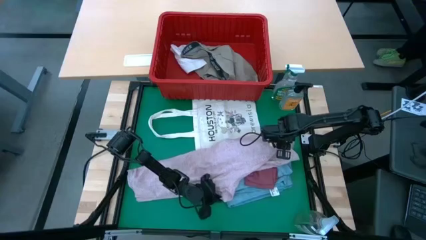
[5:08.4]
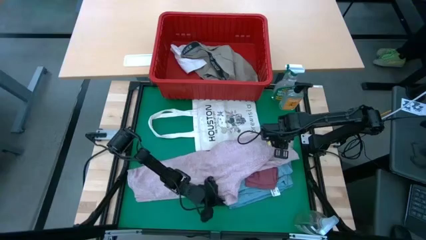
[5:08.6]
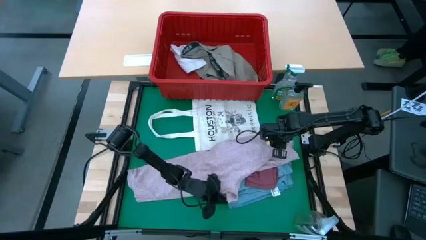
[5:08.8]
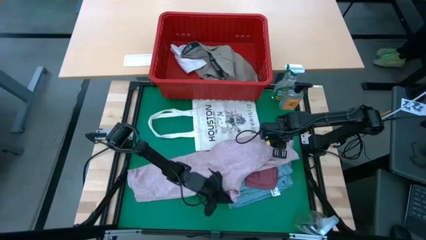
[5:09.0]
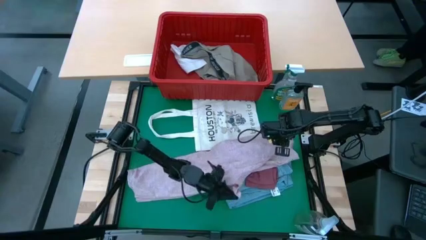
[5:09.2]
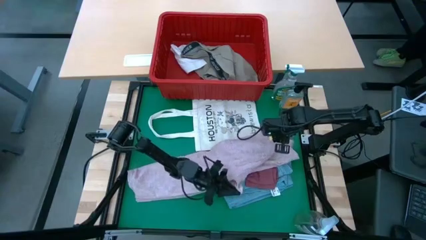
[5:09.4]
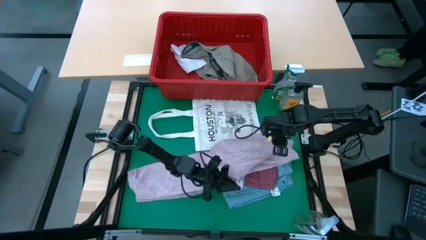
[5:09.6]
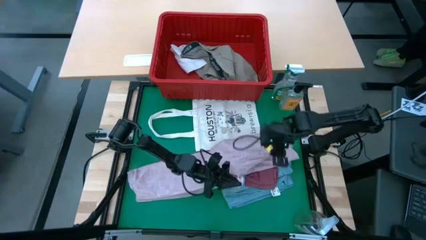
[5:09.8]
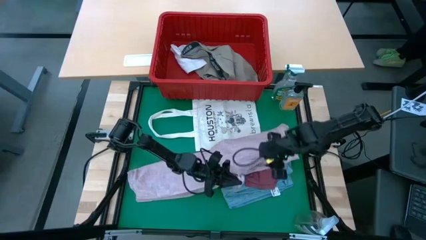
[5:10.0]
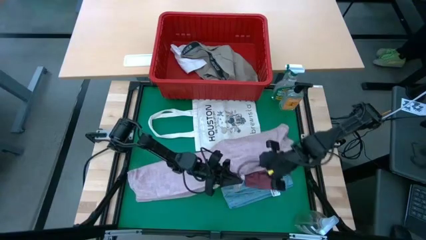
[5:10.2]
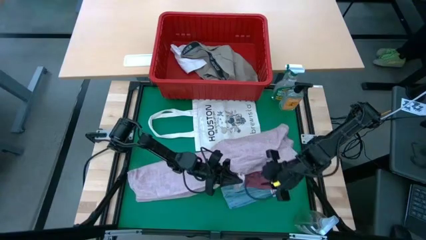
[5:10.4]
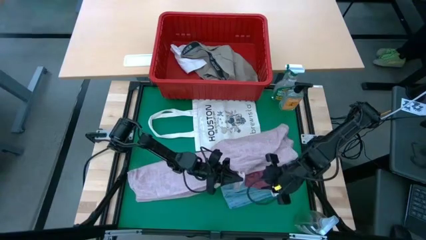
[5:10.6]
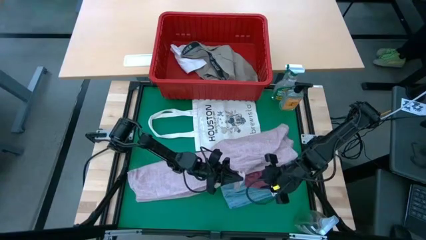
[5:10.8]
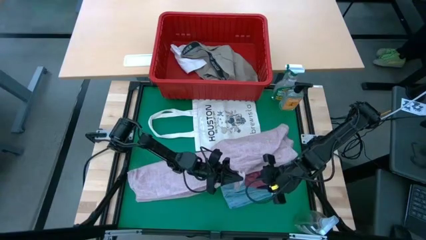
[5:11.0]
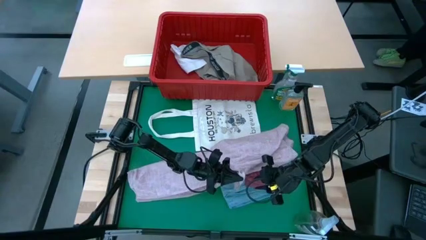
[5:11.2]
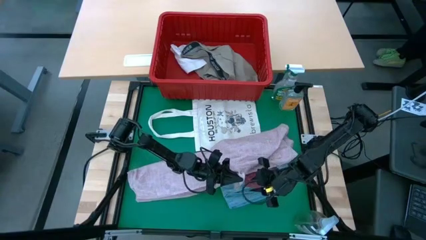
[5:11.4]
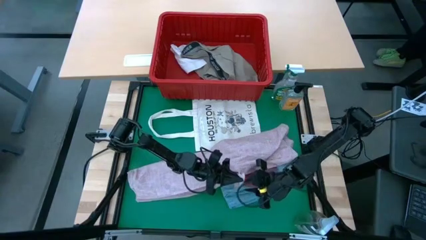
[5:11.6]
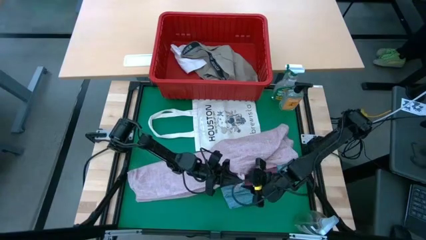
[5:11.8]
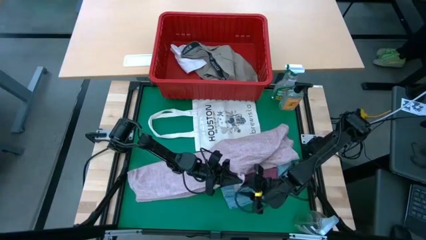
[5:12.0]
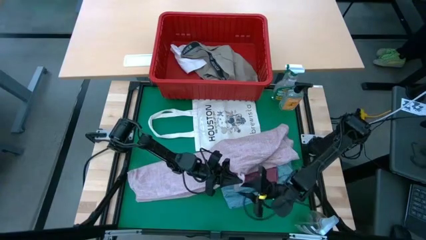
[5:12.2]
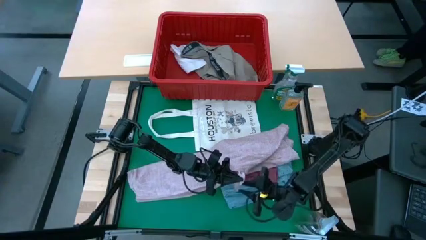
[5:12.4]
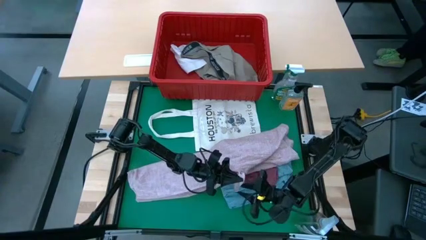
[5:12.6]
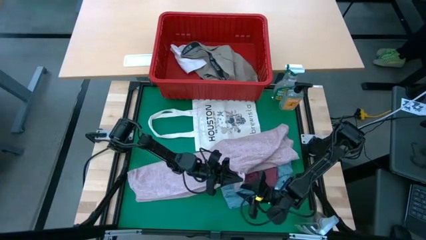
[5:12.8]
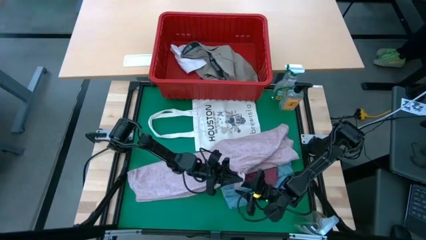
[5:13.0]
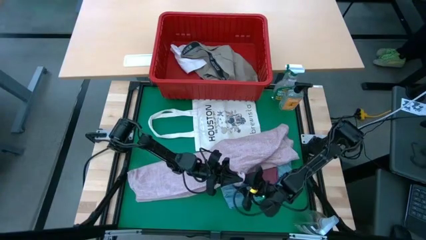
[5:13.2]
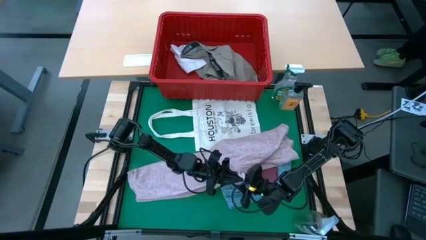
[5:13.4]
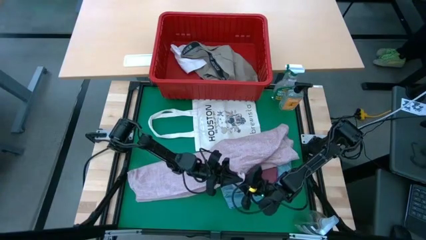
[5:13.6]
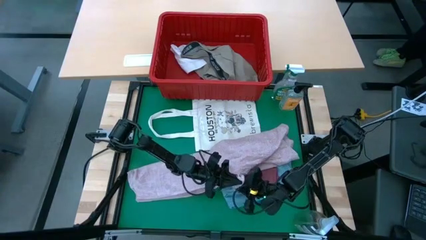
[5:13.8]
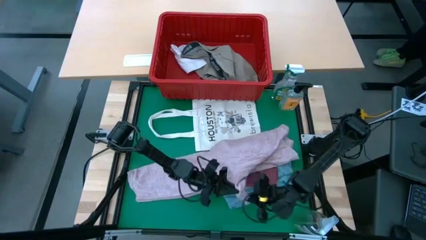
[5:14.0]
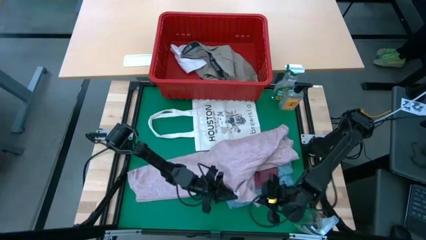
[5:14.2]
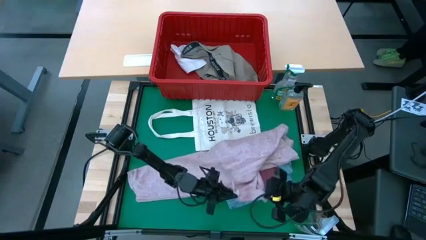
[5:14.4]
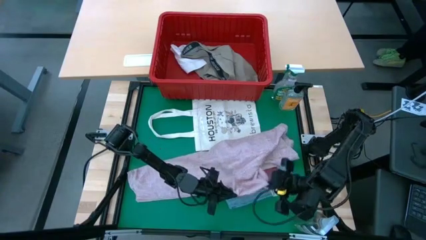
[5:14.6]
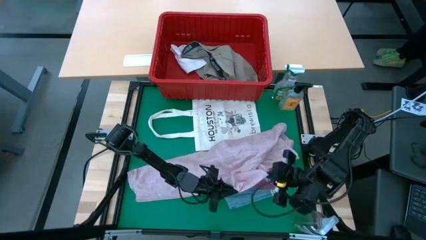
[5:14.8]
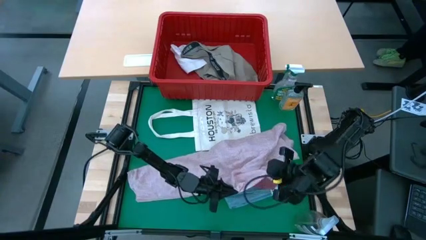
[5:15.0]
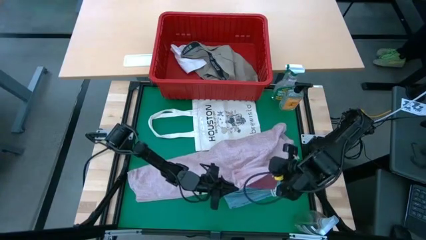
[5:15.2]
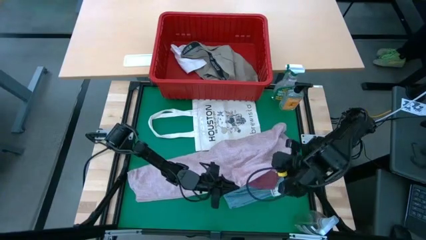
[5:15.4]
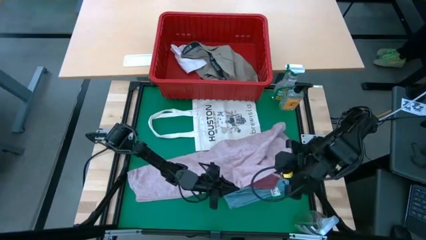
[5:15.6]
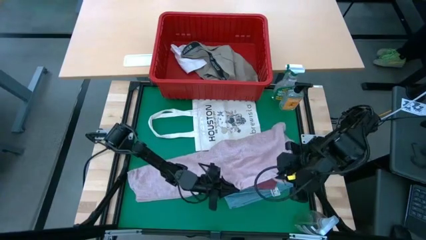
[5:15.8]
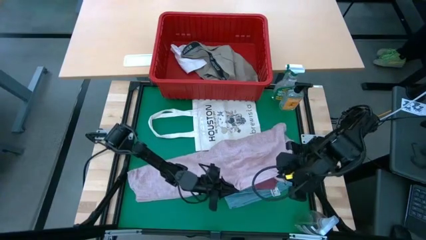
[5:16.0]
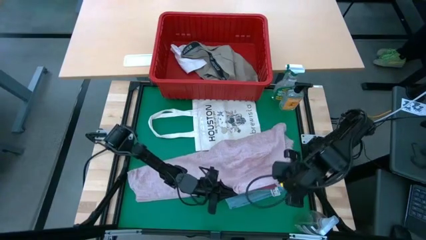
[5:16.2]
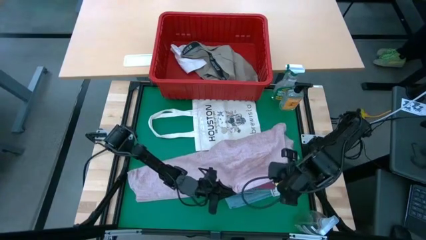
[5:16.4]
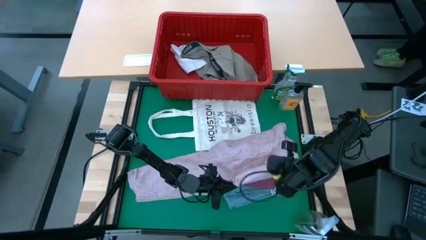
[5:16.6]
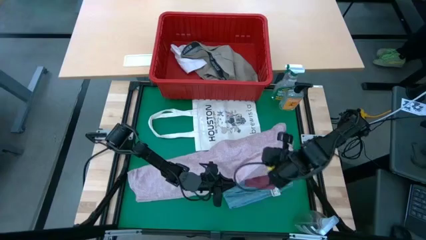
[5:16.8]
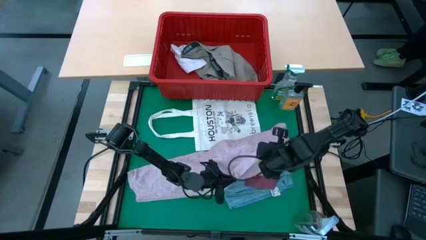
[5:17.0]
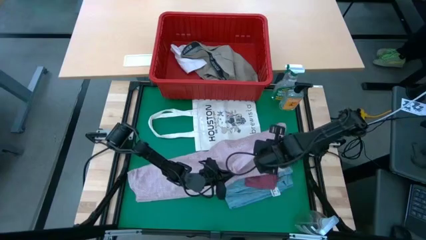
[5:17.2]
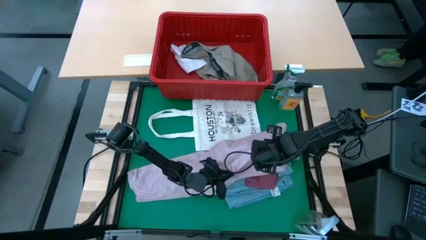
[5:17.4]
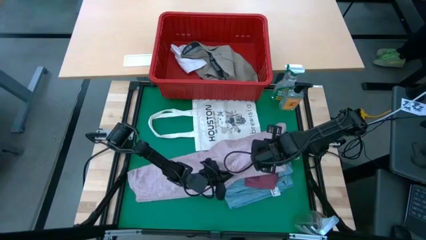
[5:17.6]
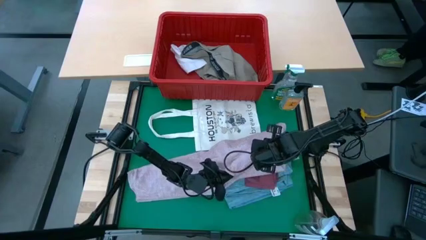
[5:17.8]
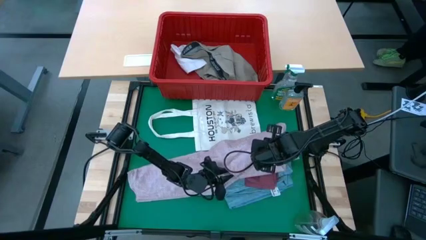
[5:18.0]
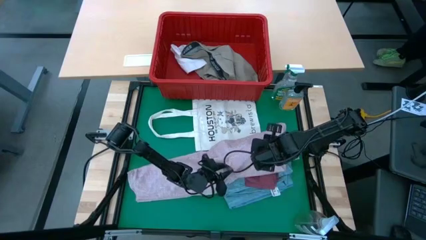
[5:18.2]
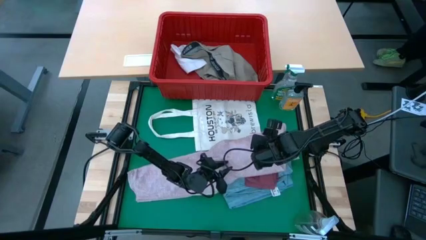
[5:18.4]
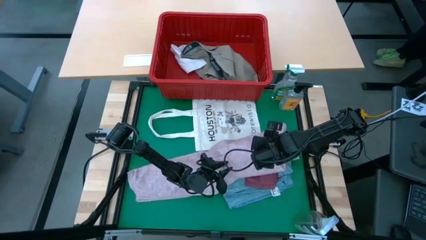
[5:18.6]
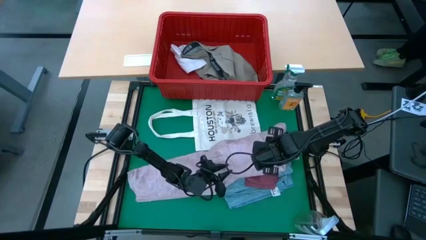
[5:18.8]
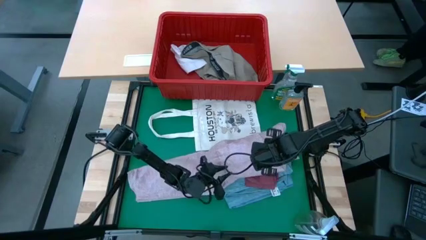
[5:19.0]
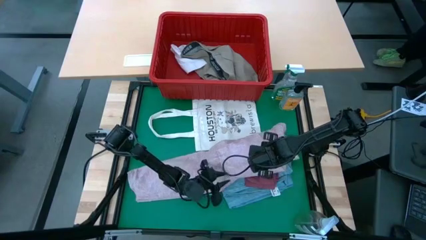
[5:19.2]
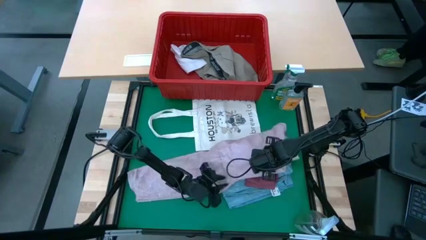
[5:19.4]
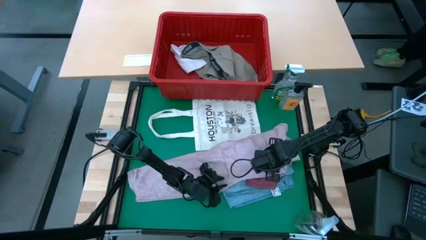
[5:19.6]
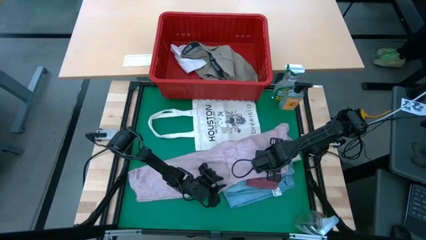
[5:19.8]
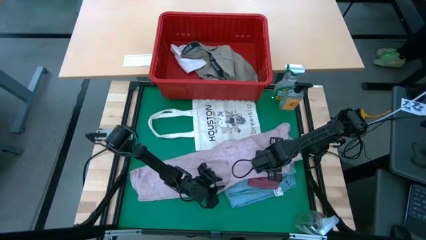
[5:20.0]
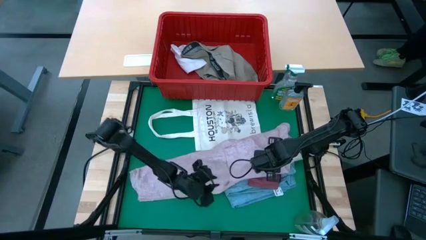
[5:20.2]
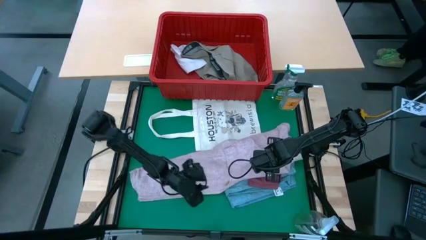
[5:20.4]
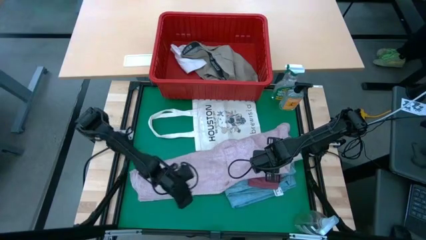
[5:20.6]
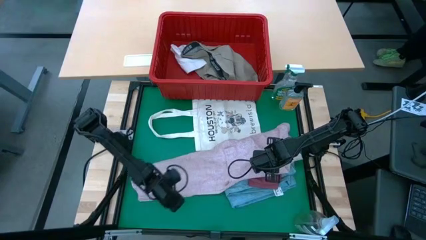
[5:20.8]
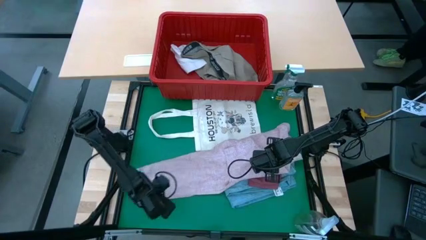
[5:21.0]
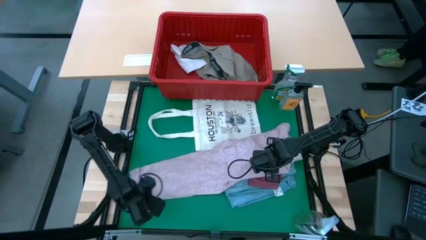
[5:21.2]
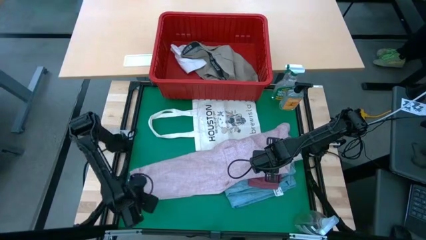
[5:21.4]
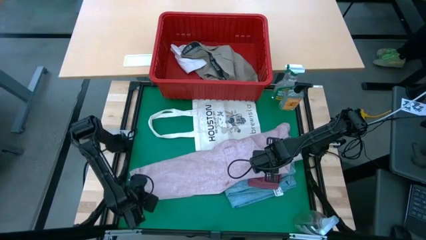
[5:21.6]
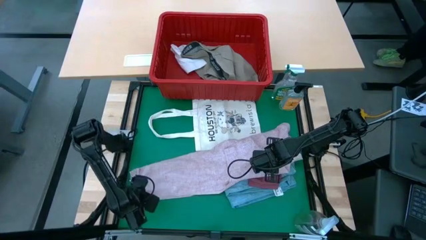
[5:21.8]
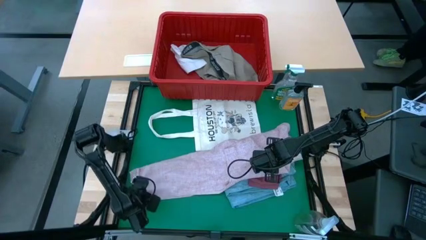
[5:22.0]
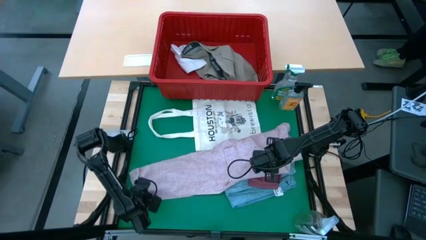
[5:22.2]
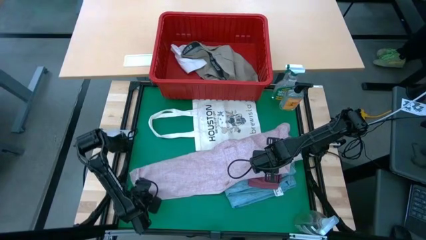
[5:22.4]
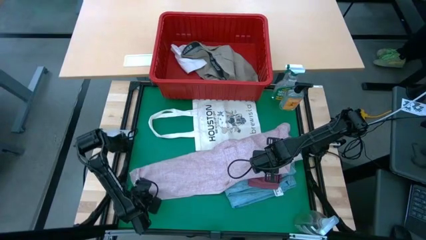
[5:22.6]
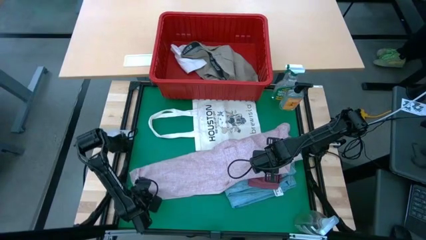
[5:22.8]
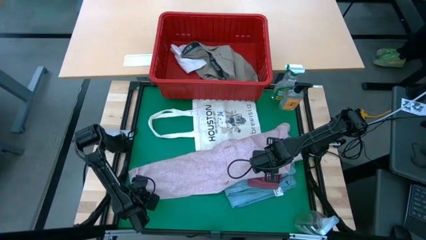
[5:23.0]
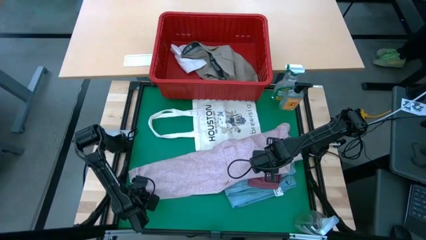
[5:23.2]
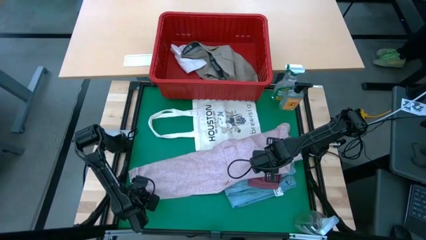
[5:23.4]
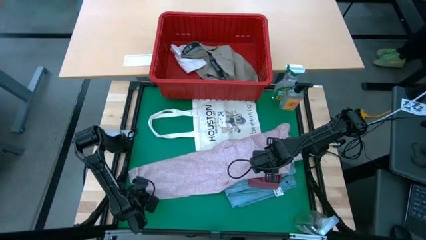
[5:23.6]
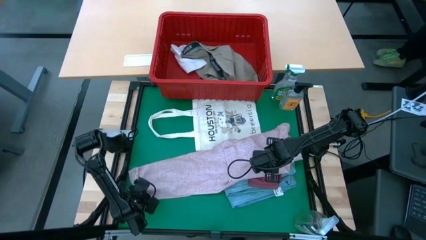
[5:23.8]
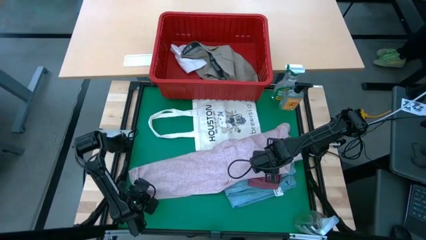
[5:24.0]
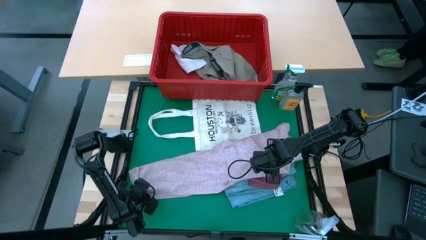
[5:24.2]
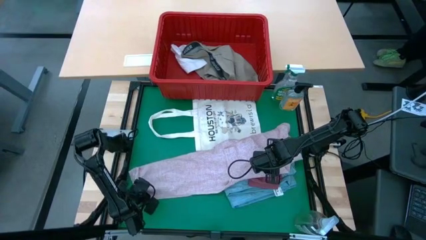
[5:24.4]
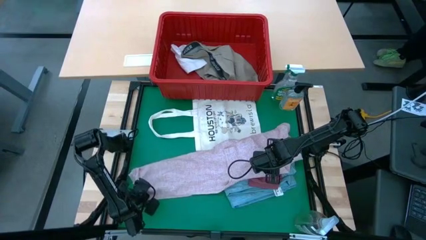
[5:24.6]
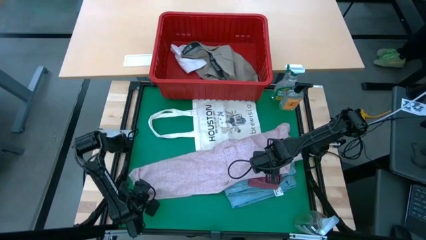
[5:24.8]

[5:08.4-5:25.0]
Task: Fold Laundry from Bin
Fold the pink shirt from the red laundry basket
